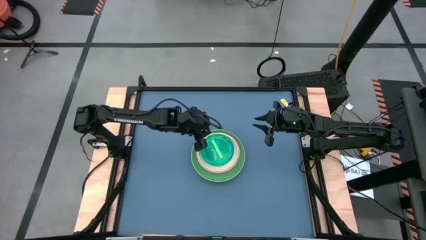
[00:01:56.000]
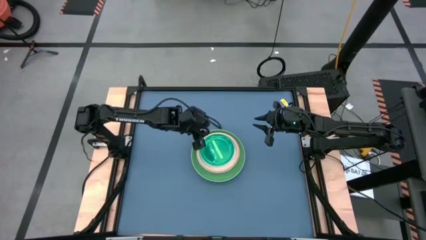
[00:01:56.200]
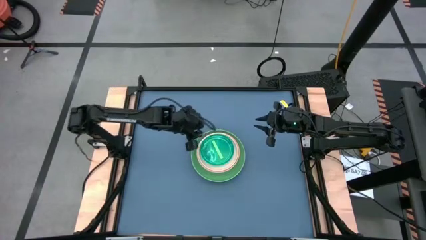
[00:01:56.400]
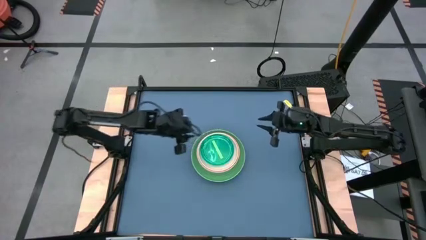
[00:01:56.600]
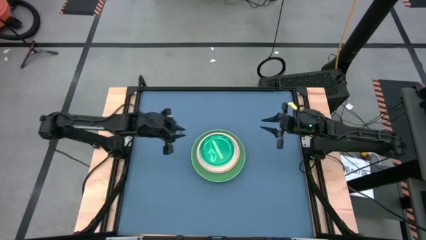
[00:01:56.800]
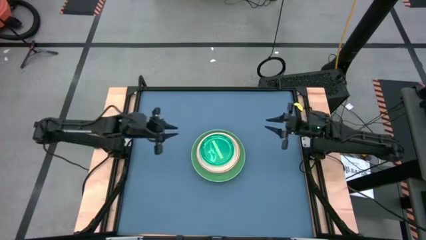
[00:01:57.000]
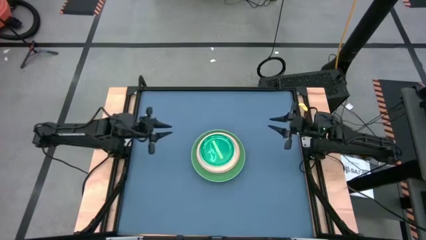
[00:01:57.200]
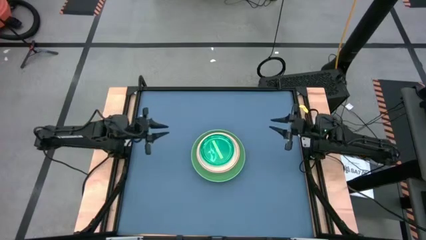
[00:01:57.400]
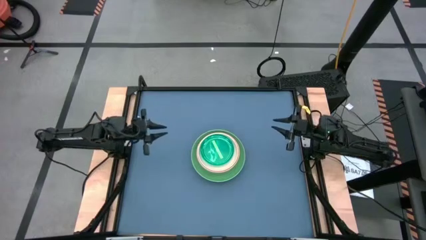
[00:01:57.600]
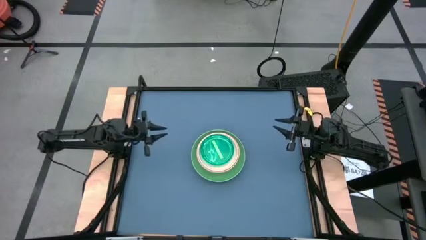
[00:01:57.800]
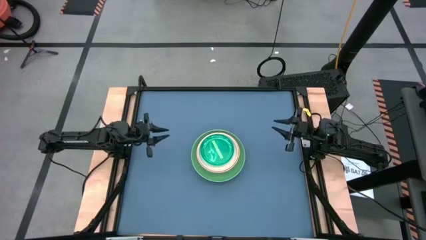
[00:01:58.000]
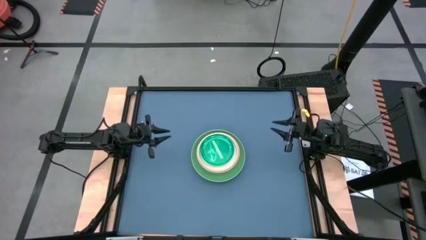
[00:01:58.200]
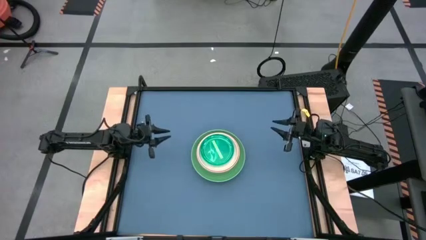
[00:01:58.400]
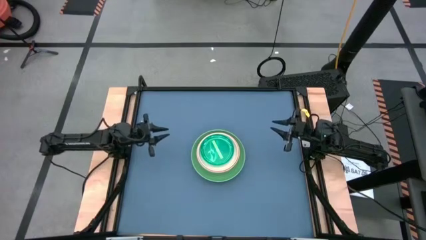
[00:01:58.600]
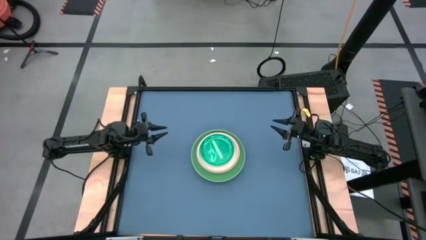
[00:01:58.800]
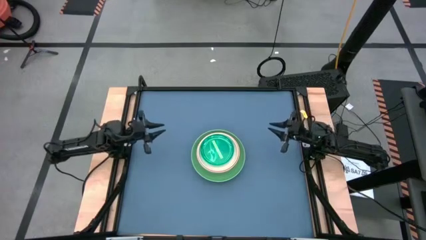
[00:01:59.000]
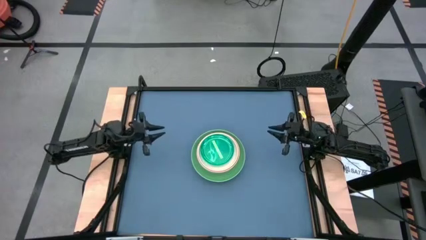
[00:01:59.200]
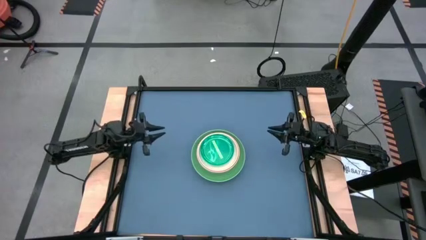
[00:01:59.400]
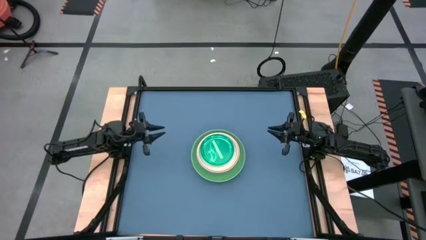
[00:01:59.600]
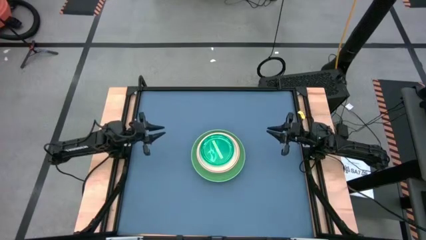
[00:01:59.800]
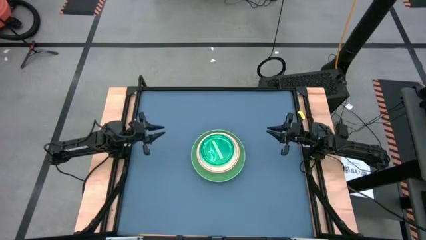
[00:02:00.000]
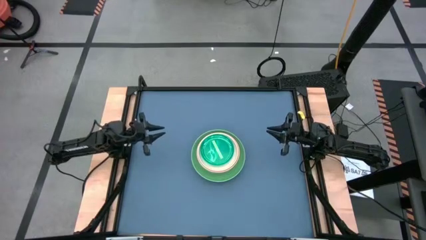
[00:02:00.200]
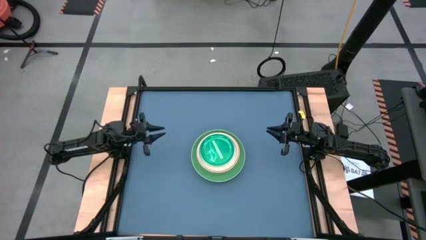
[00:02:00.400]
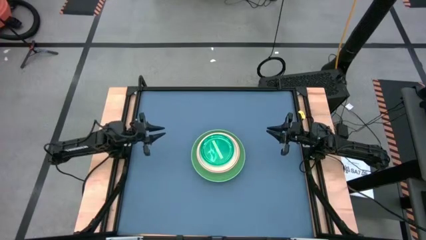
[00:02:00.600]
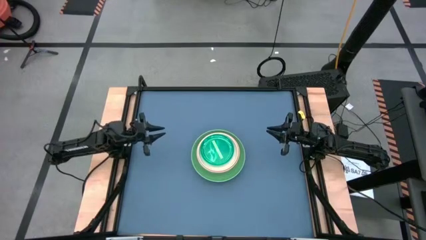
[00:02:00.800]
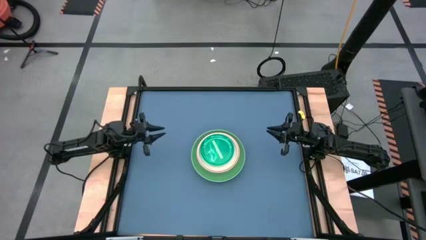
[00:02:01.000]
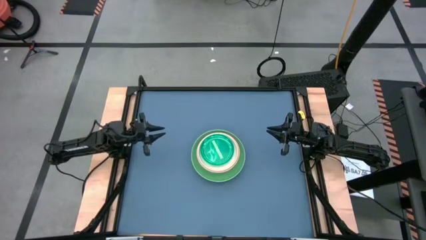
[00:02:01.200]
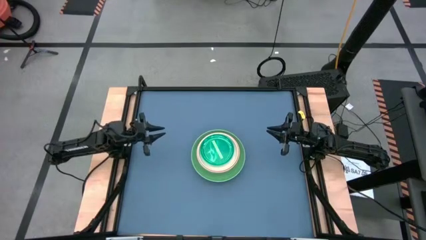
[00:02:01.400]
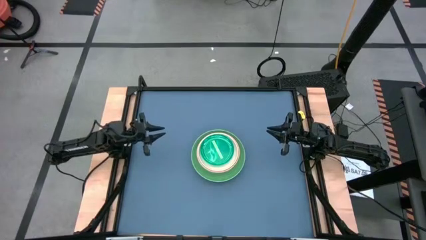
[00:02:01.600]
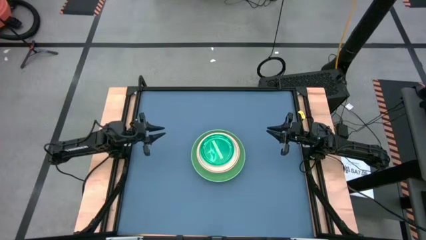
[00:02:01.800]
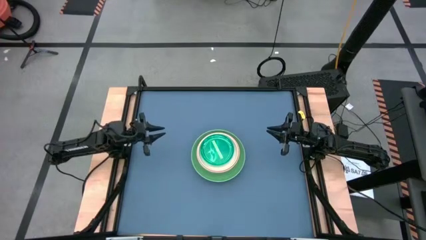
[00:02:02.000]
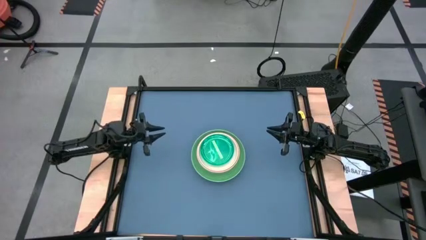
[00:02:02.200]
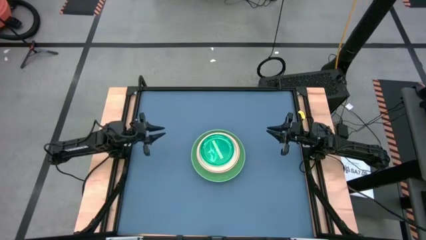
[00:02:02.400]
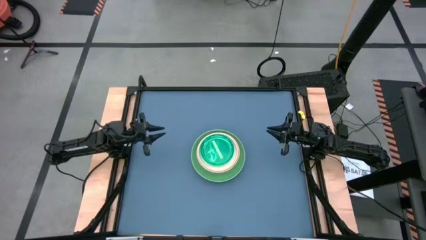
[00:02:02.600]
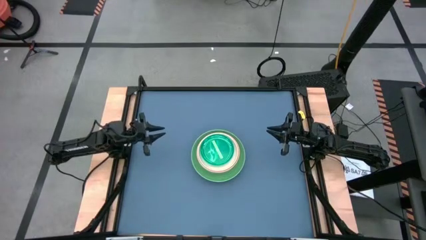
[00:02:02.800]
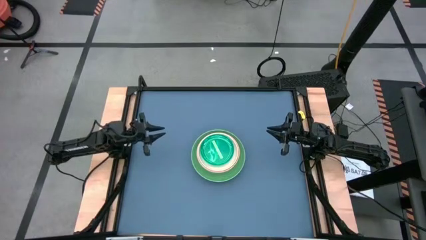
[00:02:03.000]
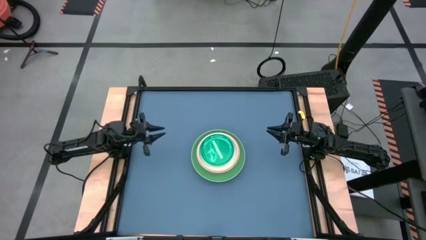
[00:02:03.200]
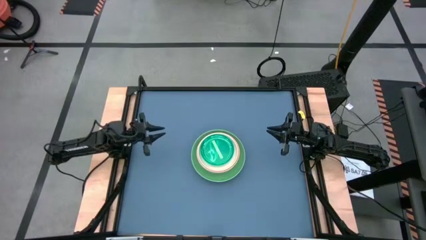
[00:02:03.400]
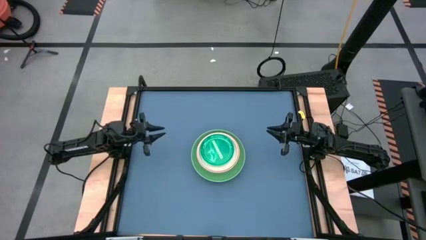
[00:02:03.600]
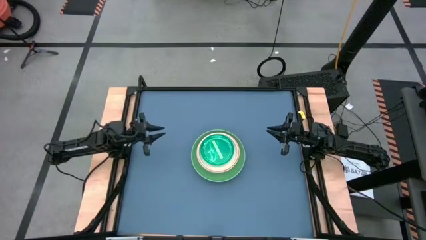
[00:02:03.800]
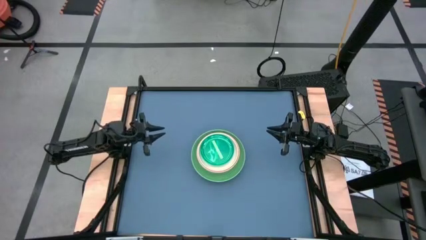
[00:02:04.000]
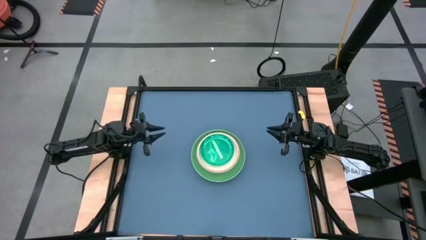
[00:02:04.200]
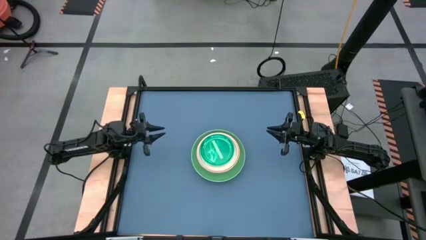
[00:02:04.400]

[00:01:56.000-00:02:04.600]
Task: Stack plastic plates
Return to Home Position

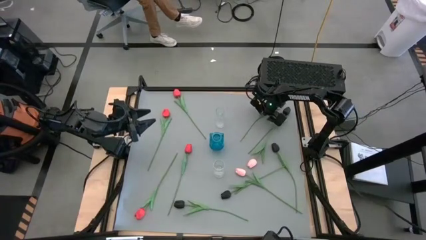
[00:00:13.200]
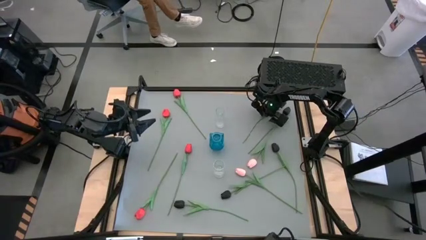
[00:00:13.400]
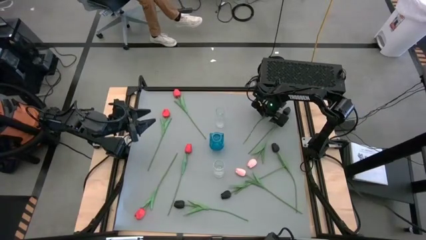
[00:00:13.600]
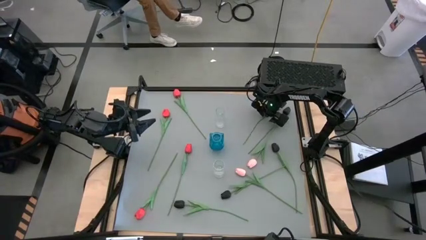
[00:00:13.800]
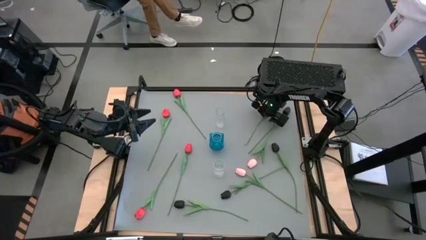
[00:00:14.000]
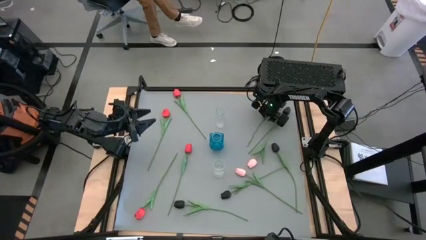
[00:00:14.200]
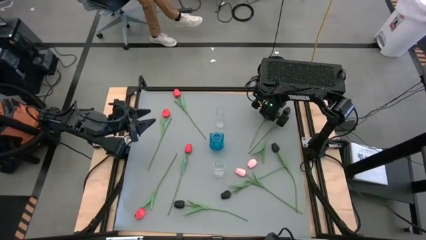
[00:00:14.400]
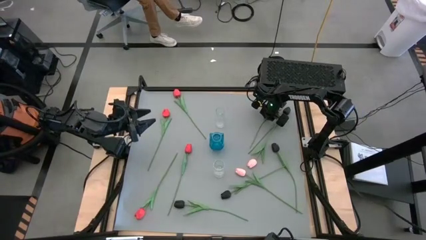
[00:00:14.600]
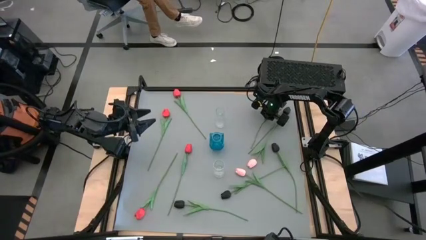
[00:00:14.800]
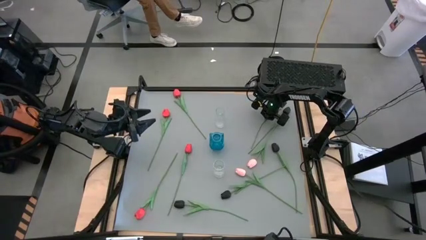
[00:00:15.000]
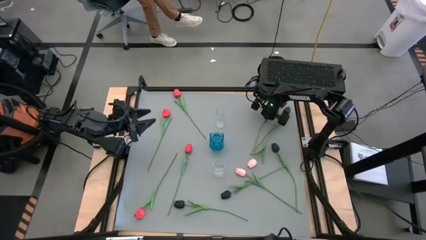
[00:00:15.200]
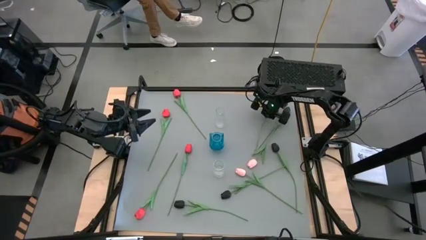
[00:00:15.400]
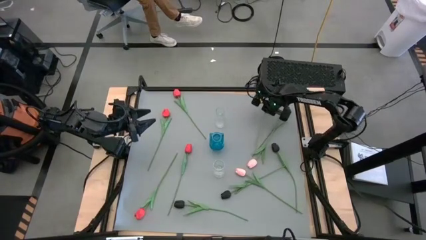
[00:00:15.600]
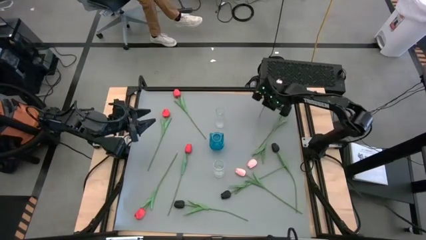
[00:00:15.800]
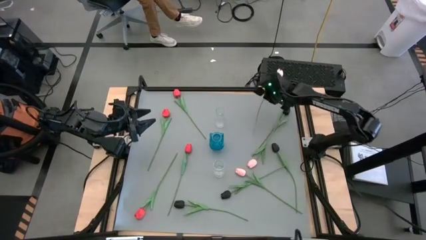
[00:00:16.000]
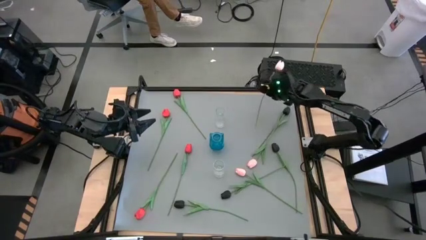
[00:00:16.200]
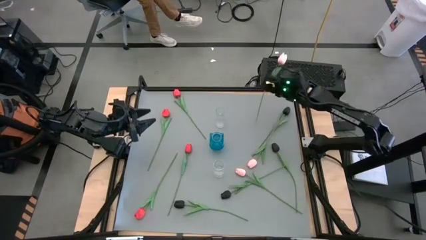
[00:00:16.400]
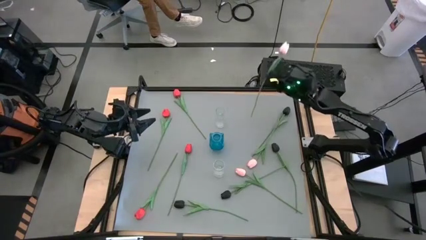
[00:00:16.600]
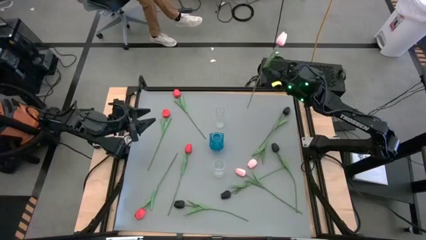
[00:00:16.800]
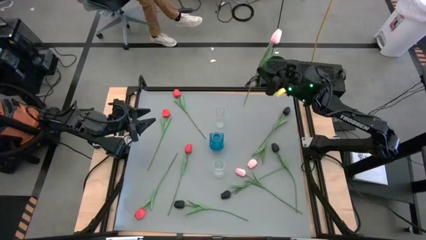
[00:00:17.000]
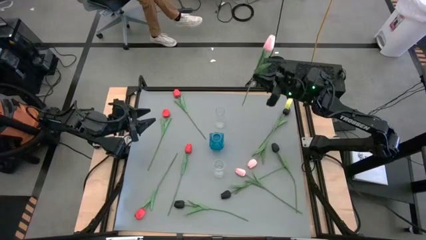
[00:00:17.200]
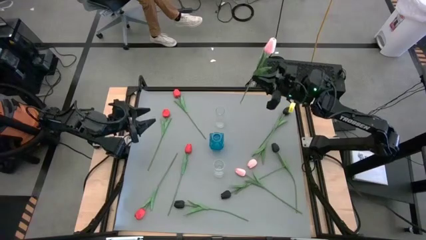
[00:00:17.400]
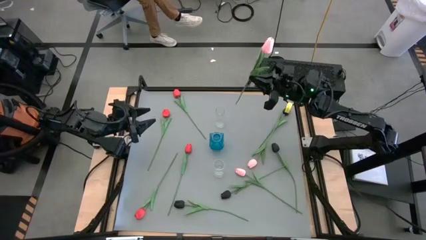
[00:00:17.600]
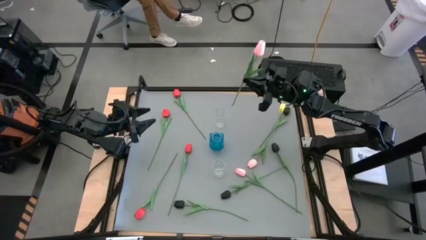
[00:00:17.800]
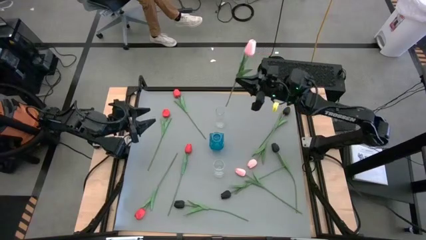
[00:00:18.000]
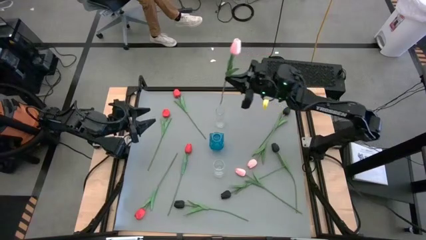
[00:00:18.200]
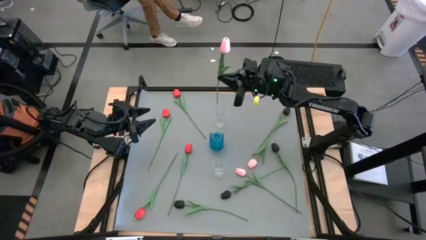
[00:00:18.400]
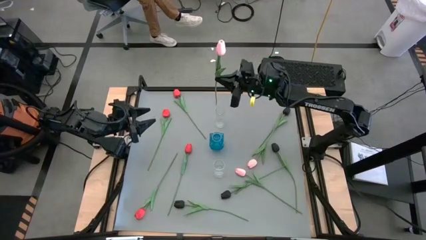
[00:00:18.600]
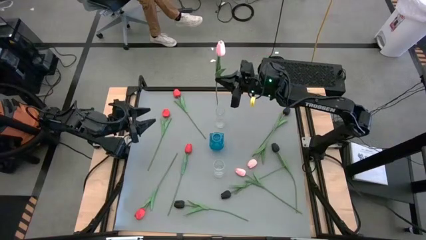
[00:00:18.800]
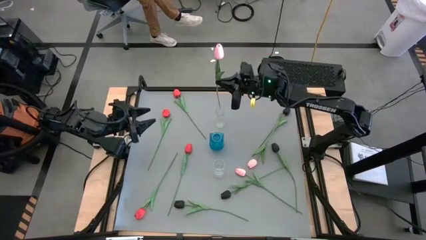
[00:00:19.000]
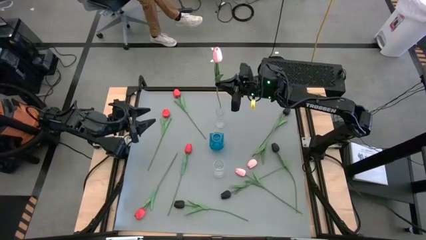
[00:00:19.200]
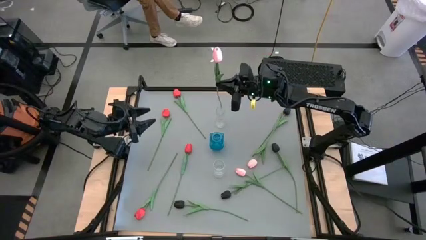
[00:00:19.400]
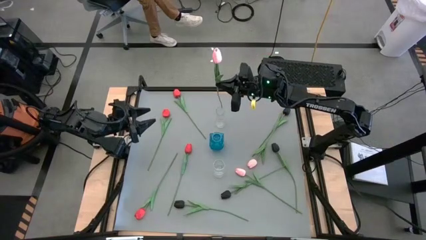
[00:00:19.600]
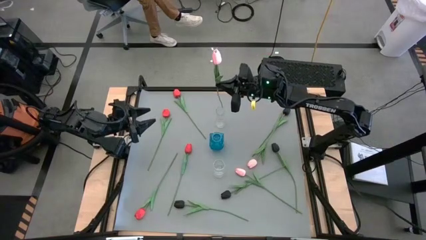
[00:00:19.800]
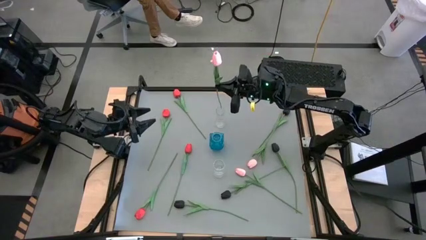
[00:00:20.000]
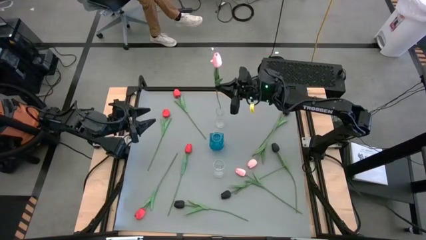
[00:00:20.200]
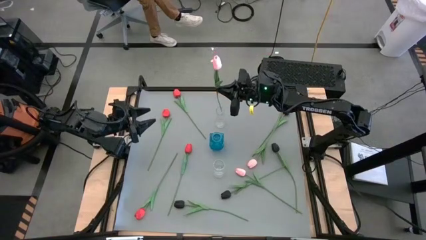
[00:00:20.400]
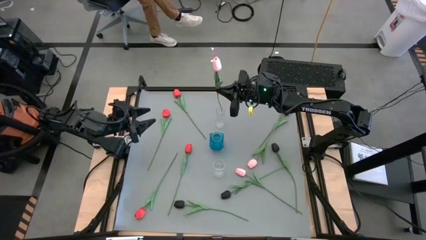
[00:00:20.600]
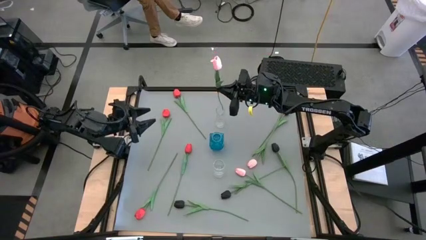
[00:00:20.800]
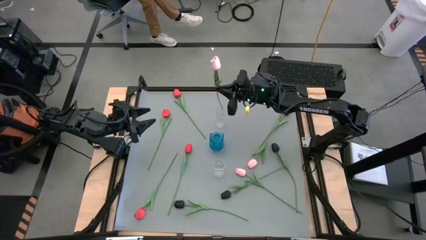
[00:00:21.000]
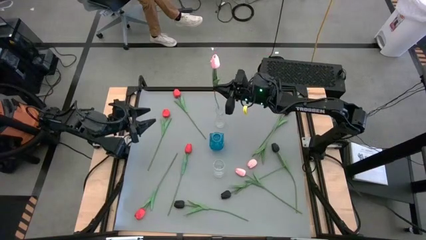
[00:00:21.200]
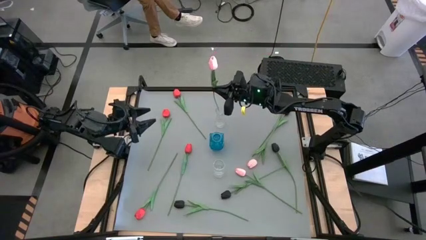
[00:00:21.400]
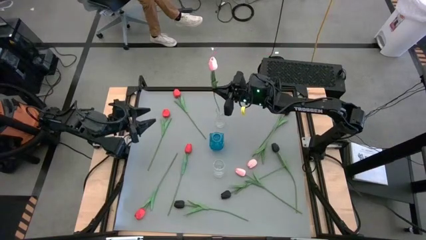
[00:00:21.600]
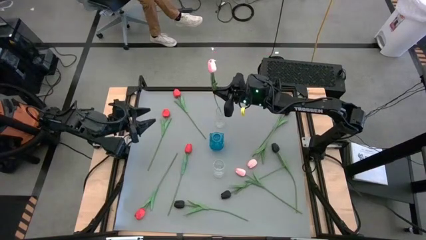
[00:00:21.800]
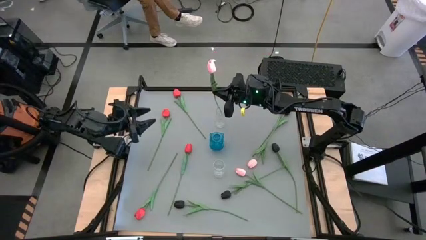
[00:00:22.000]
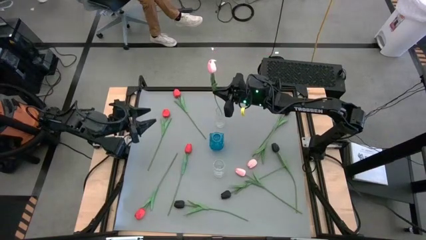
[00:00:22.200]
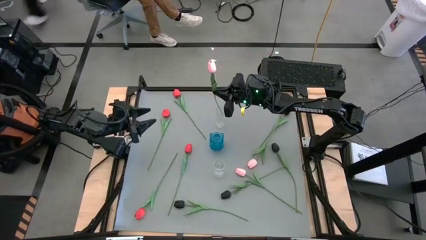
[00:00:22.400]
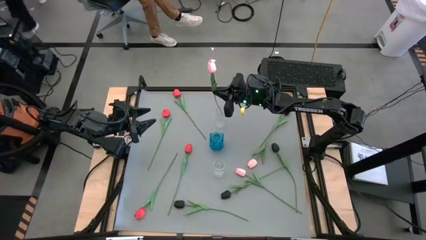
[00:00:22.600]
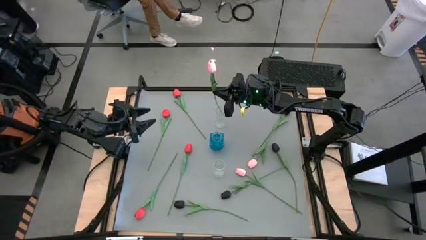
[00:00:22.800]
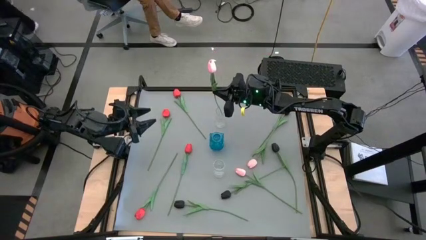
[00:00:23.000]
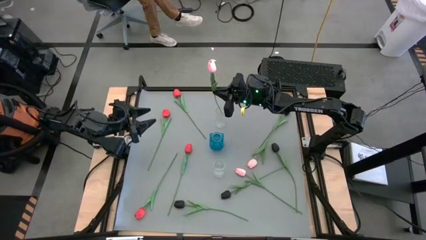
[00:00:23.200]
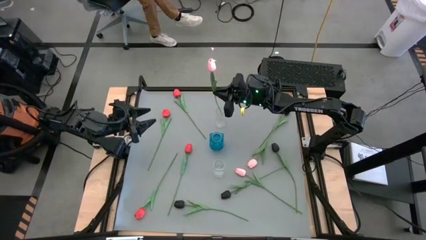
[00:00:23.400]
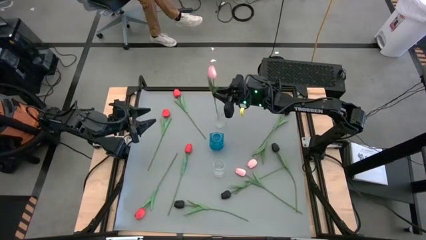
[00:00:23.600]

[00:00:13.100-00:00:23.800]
Task: Sort flowers into vase by color
Put the top pink tulip into the top transparent vase
